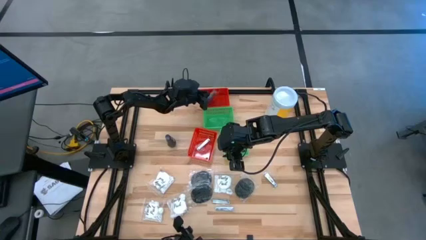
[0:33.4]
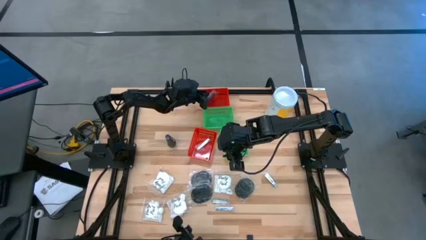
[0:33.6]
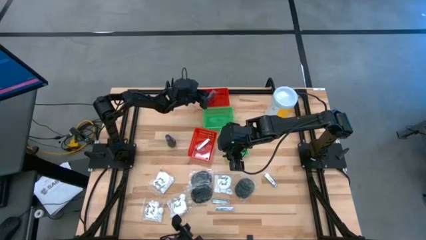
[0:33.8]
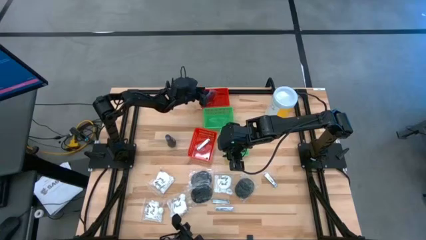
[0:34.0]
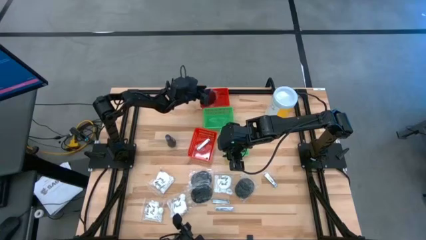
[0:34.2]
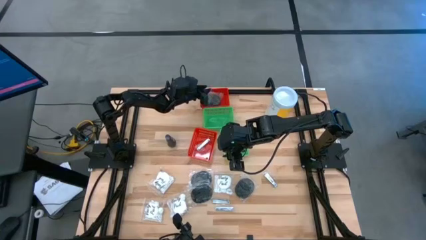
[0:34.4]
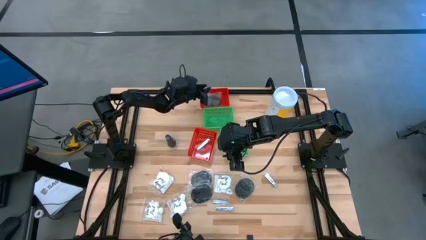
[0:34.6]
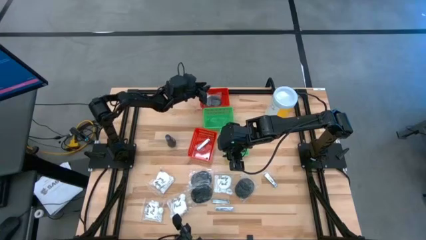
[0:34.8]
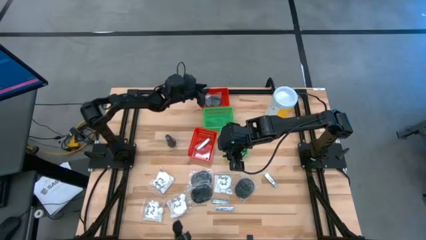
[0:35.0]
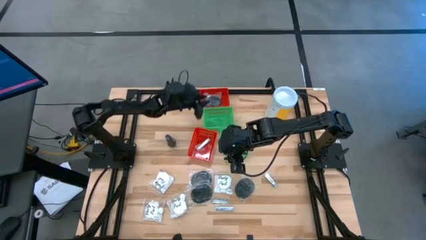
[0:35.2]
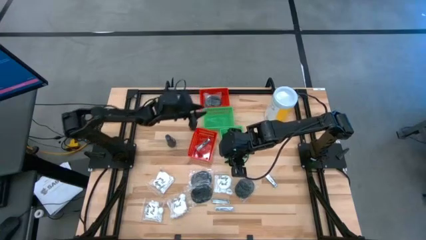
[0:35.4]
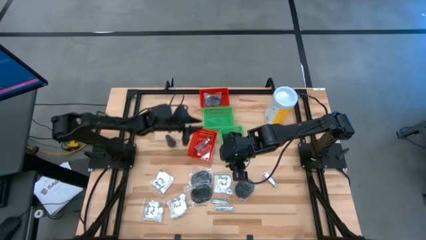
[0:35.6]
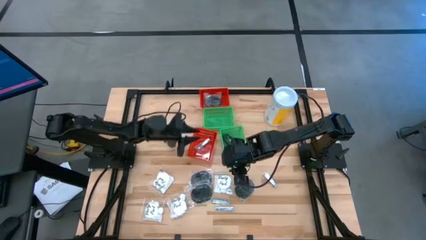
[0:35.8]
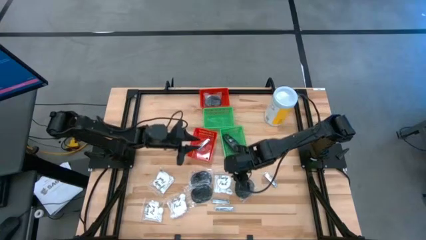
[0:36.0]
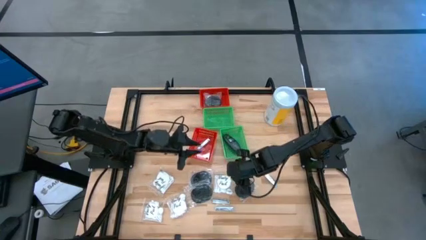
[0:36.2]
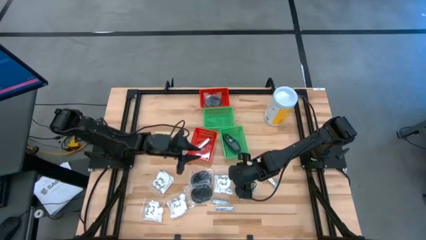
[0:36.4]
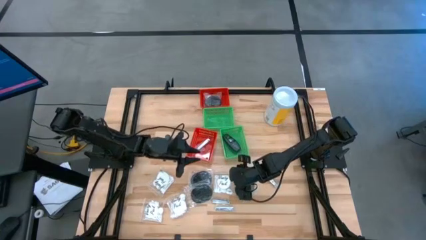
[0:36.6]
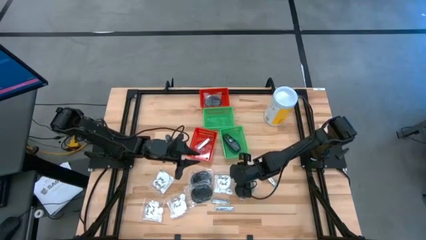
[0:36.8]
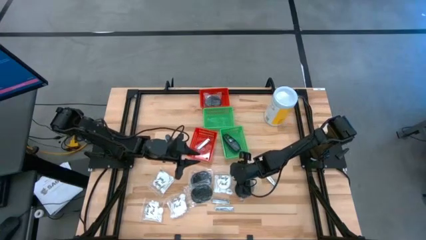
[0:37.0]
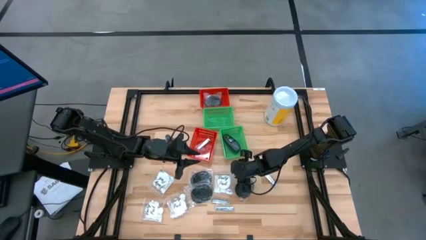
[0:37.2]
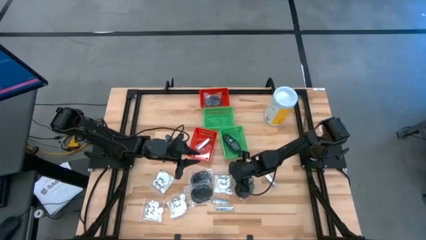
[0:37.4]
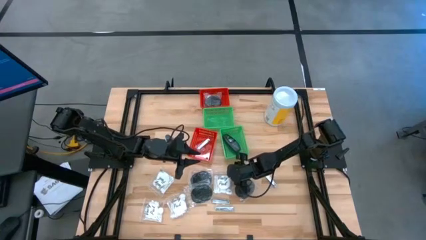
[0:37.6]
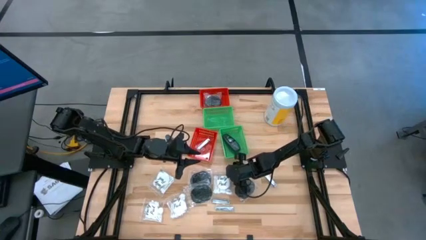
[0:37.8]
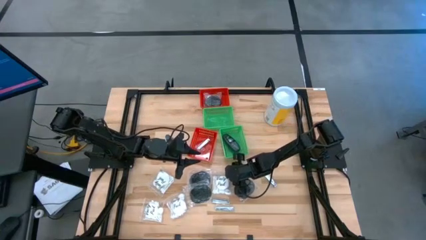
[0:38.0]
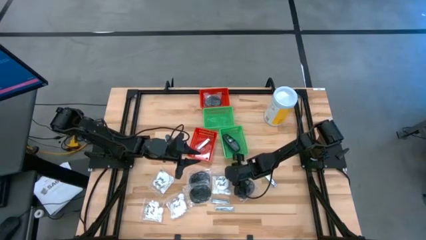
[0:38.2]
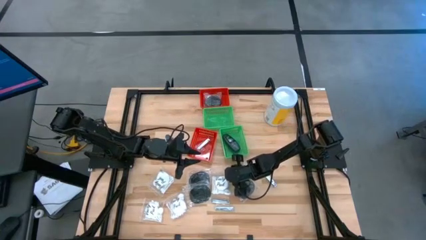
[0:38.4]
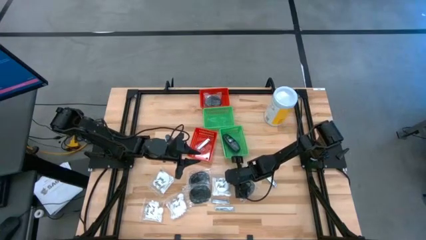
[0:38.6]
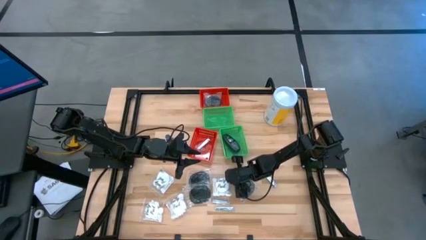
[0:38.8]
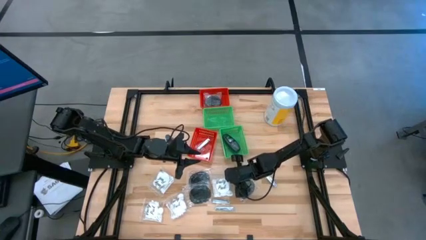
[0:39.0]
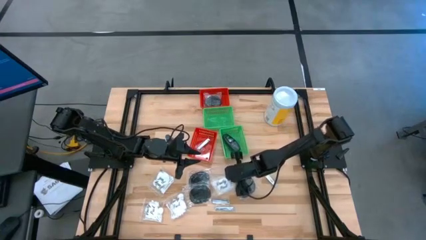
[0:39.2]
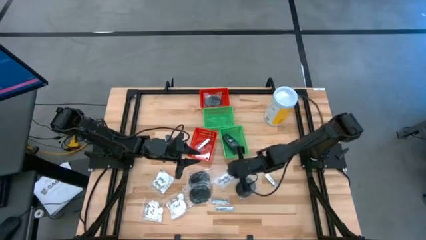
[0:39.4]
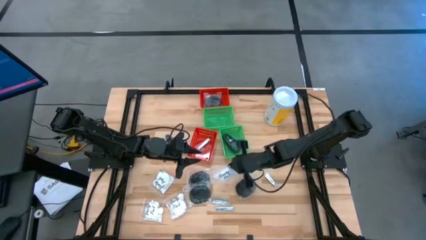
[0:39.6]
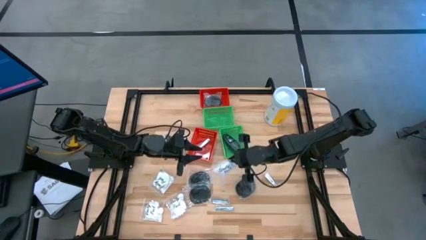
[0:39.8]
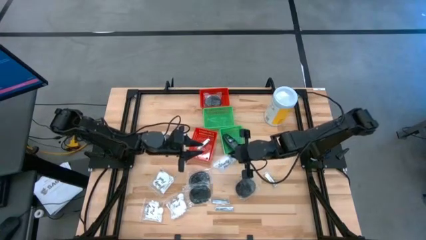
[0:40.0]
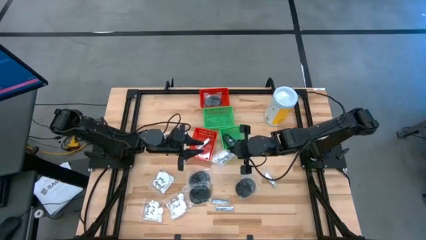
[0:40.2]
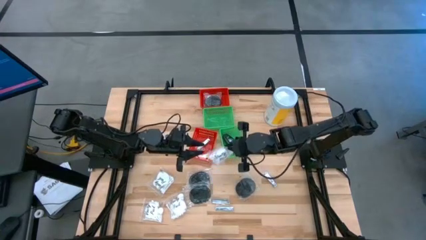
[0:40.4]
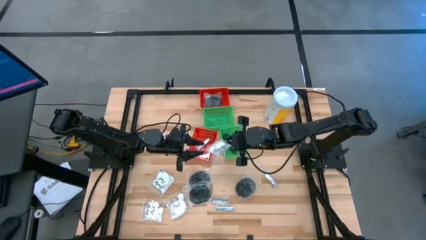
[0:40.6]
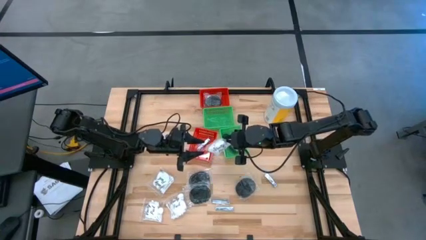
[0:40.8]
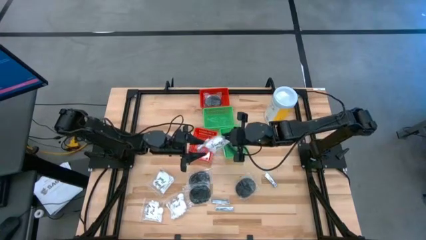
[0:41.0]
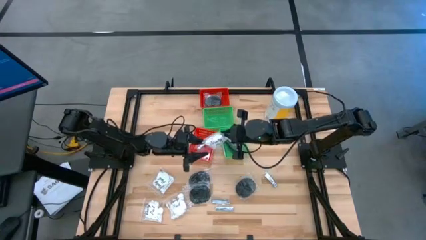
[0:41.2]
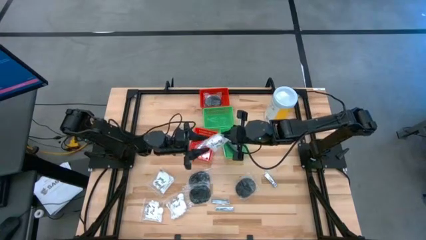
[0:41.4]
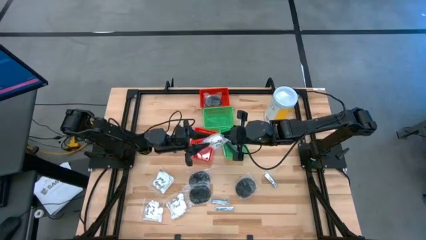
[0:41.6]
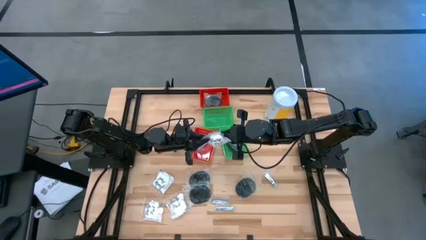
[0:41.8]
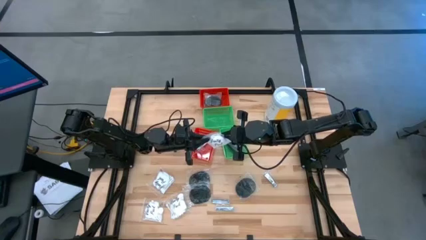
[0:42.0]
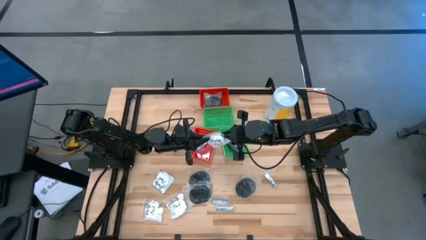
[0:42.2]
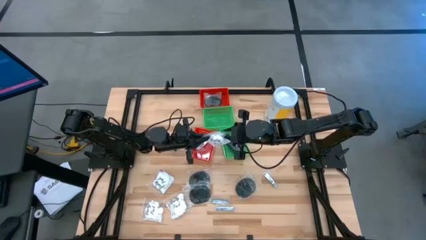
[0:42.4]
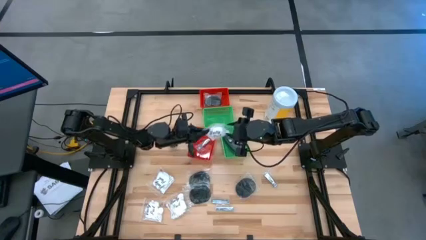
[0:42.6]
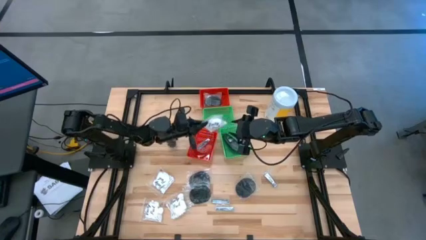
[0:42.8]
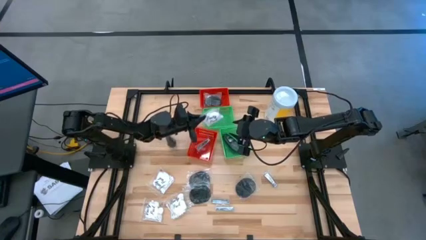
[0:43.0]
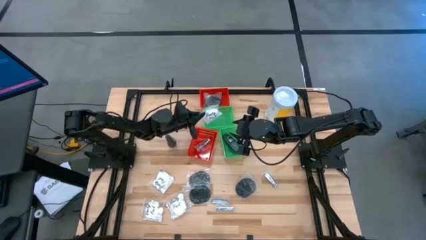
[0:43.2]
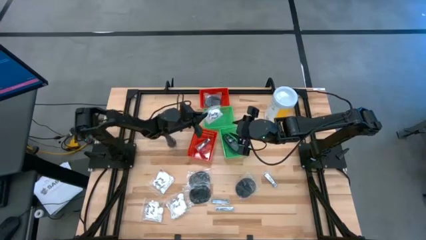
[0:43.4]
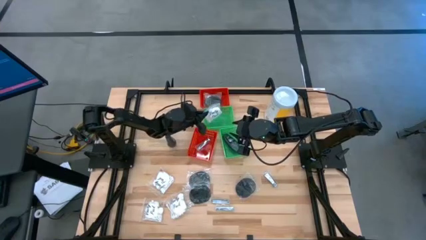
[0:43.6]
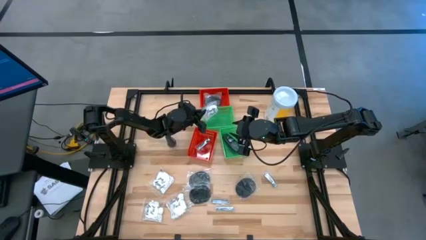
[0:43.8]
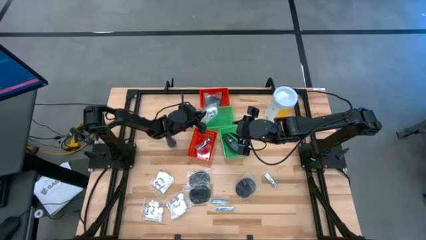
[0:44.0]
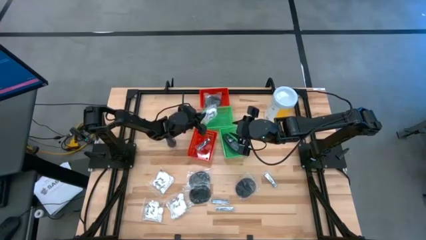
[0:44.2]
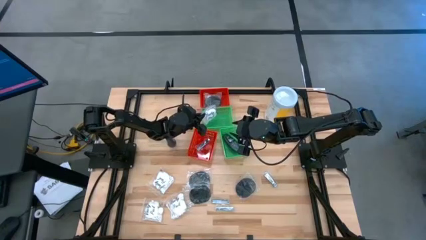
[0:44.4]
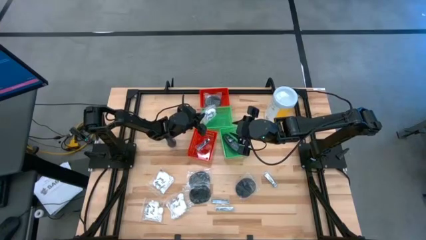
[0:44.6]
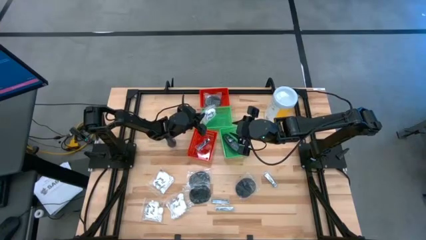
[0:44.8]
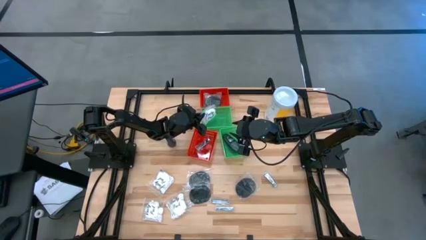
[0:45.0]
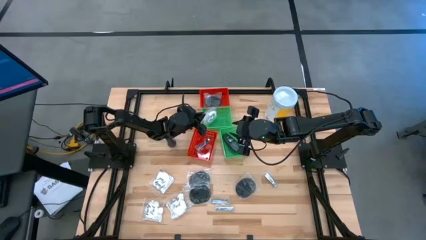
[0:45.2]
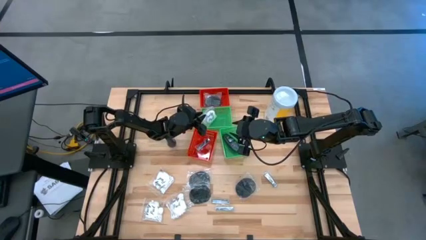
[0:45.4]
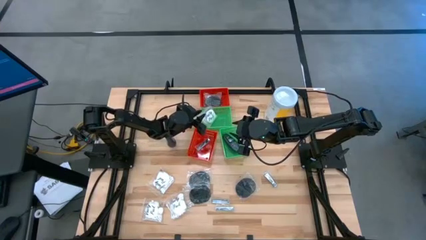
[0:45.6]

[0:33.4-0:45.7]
Task: Pick & Place Travel size toiletries
Put the white cotton pack into the top green bin
